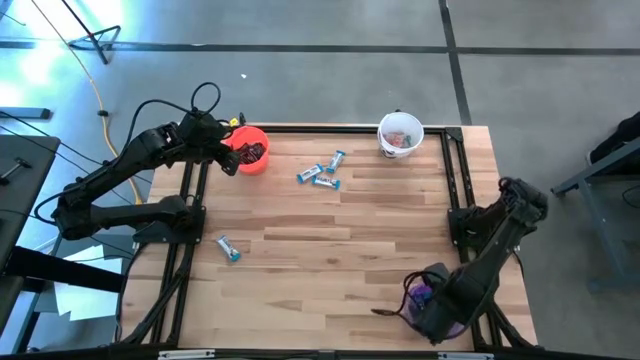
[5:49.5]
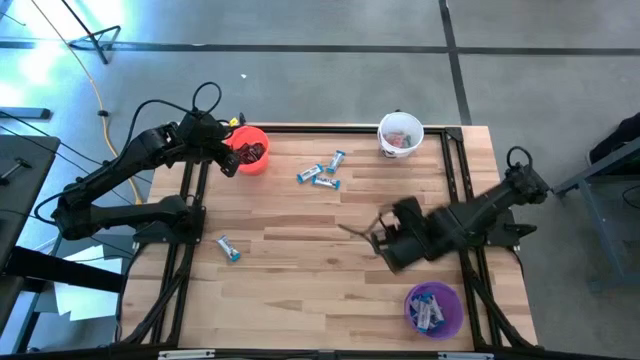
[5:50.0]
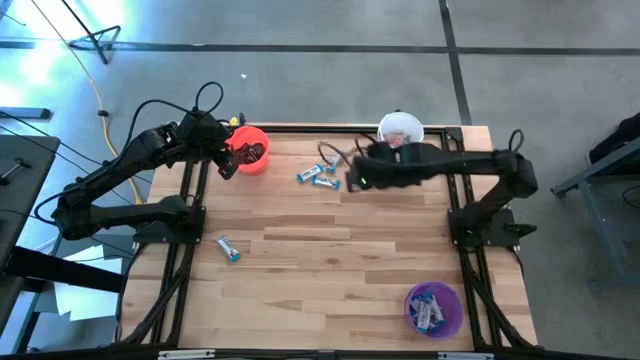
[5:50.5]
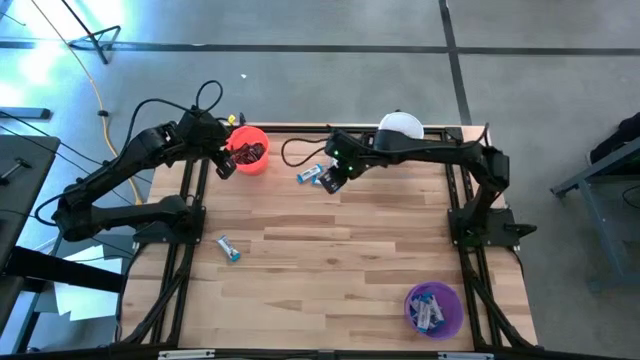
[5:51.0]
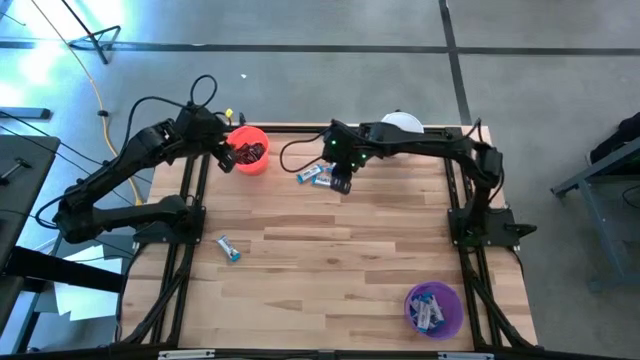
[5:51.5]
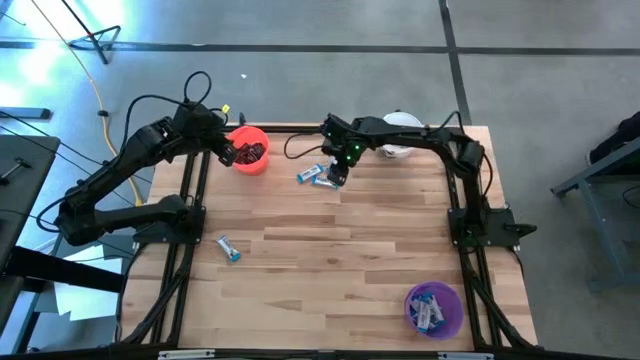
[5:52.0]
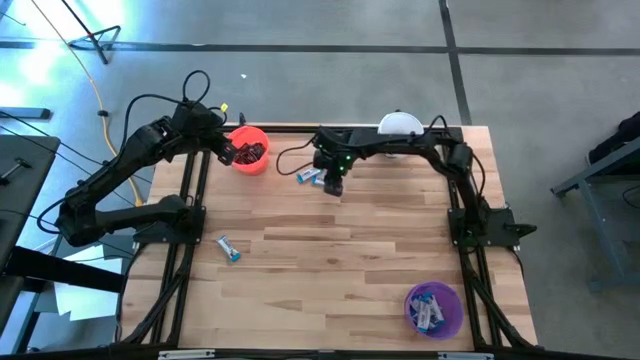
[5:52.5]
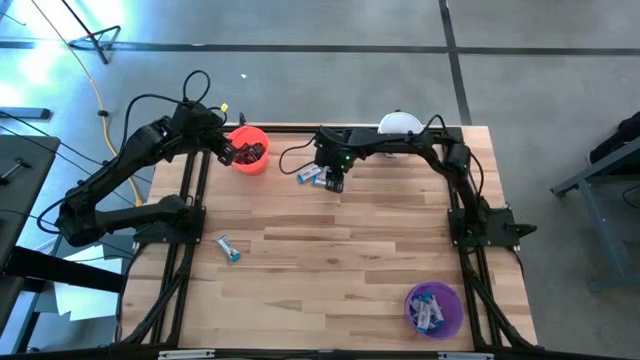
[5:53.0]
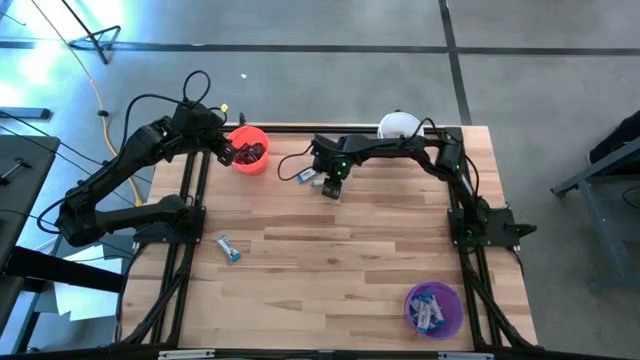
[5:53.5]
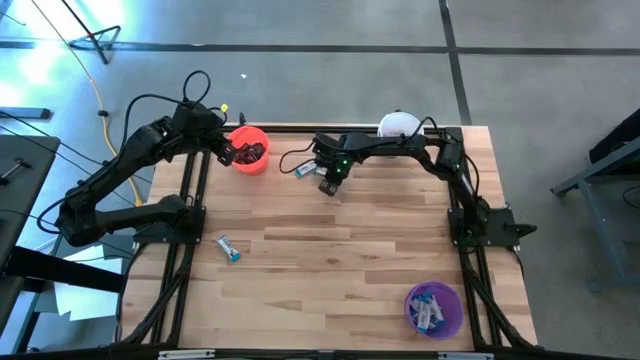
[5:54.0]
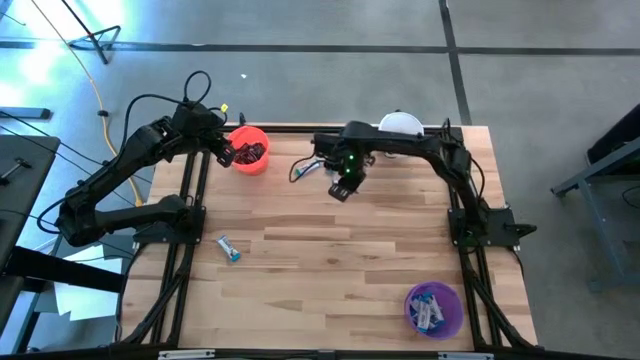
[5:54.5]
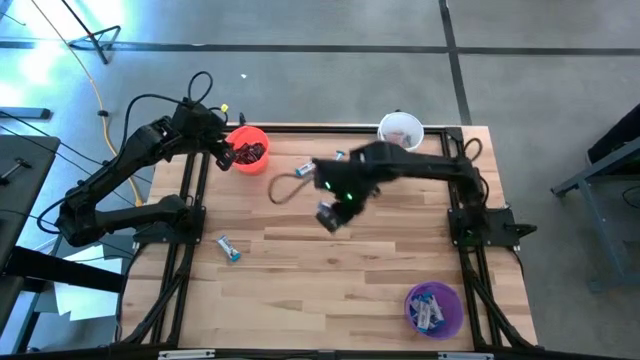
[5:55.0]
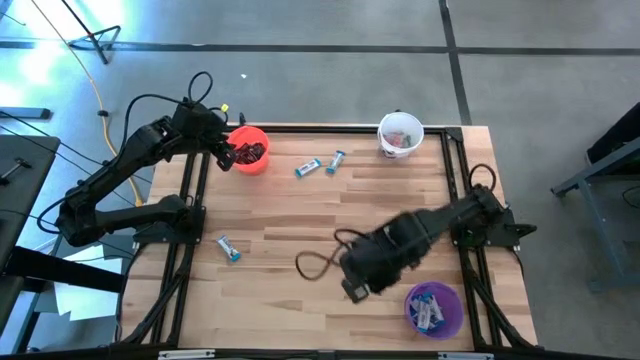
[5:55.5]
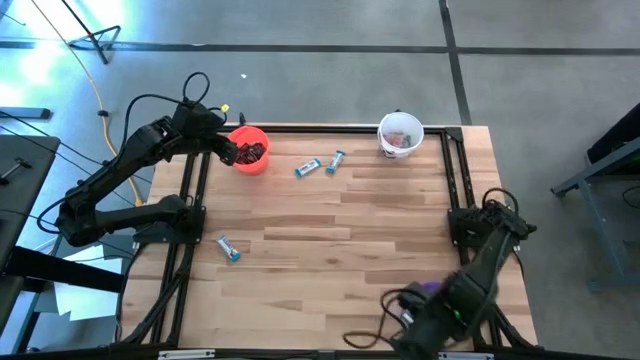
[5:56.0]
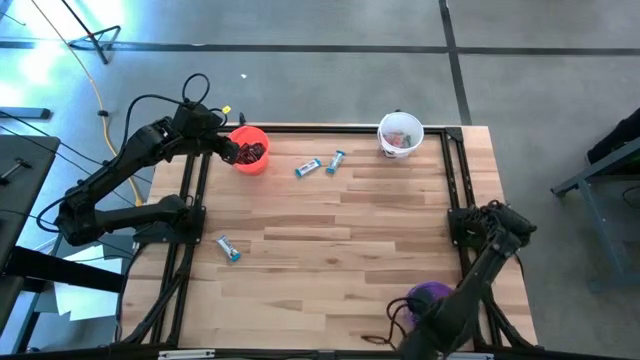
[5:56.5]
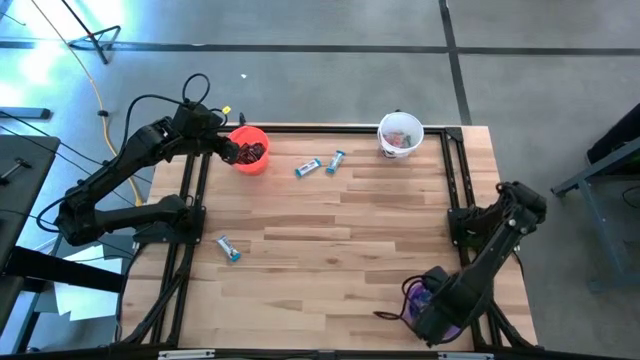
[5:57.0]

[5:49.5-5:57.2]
Task: Sort candy
Put the white chocolate into the violet bucket

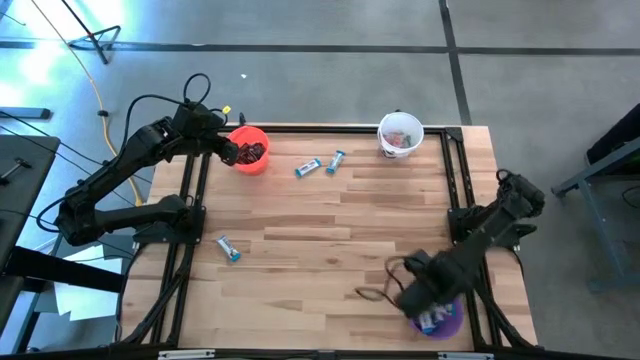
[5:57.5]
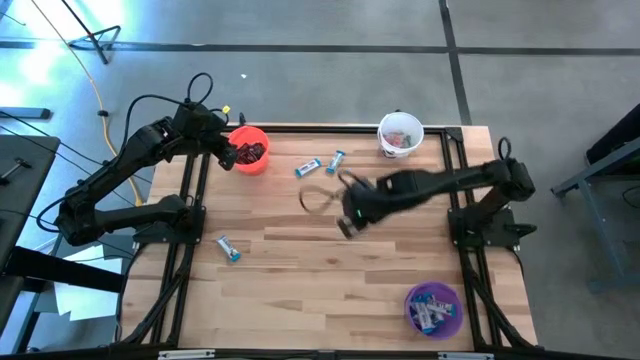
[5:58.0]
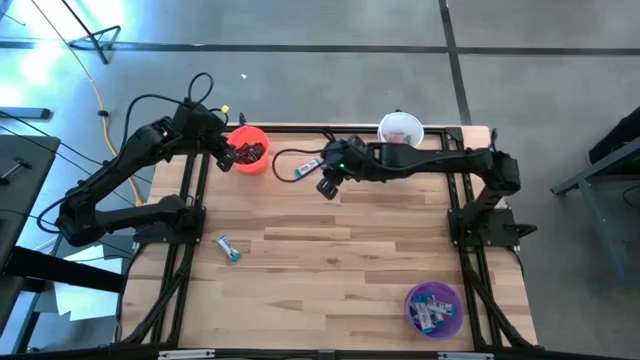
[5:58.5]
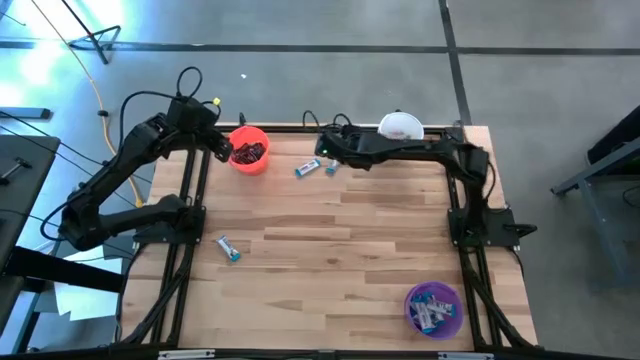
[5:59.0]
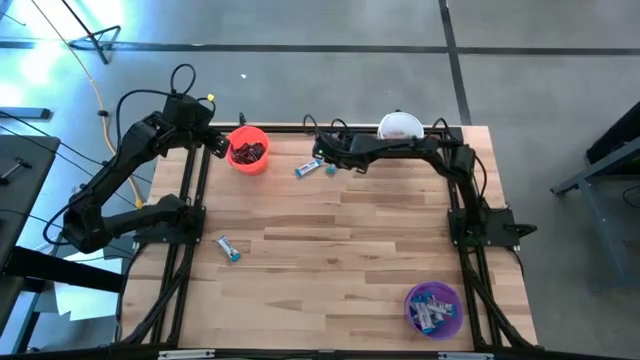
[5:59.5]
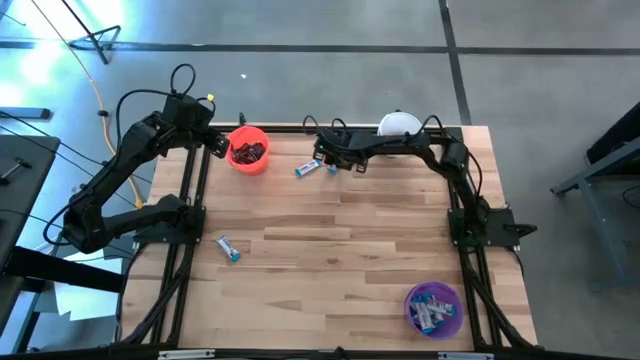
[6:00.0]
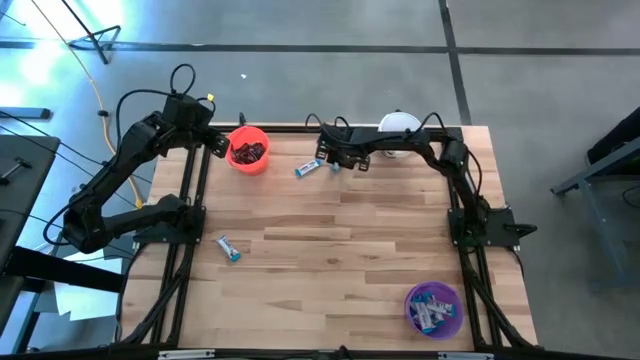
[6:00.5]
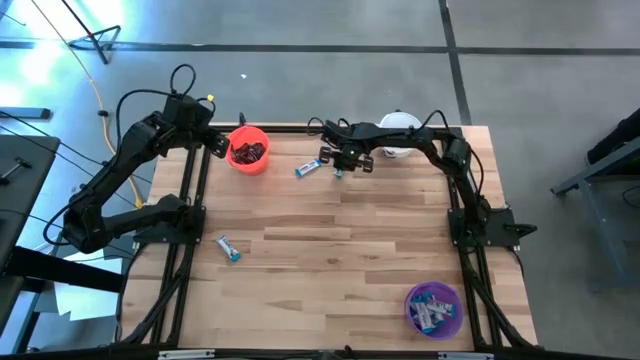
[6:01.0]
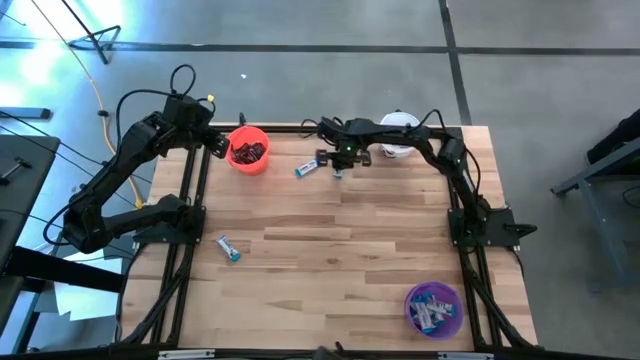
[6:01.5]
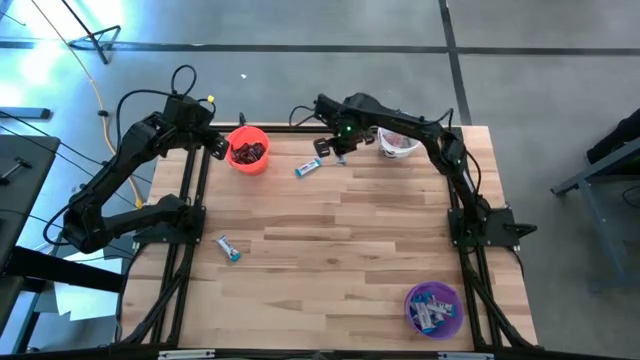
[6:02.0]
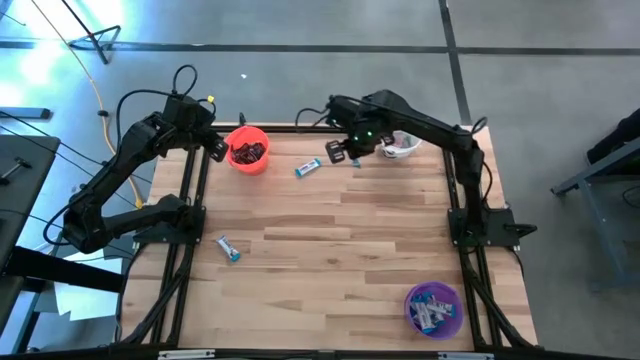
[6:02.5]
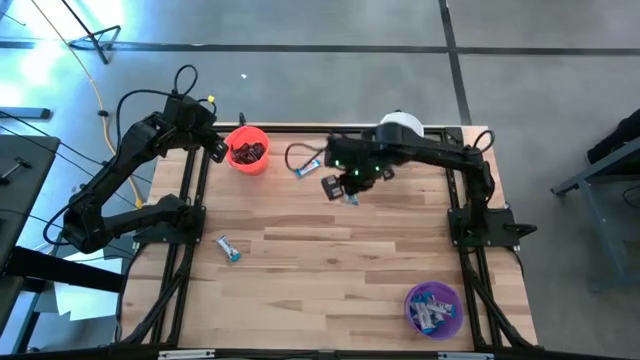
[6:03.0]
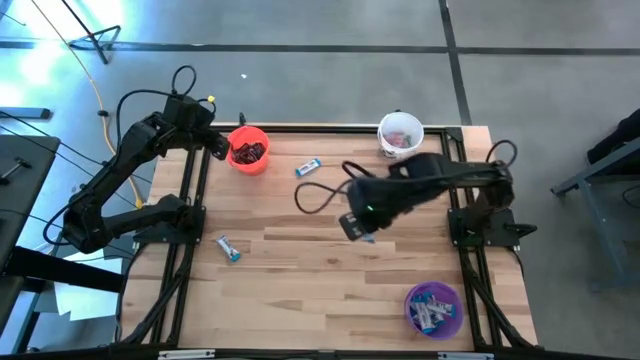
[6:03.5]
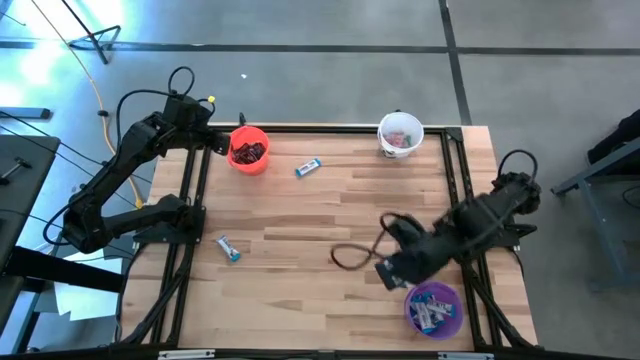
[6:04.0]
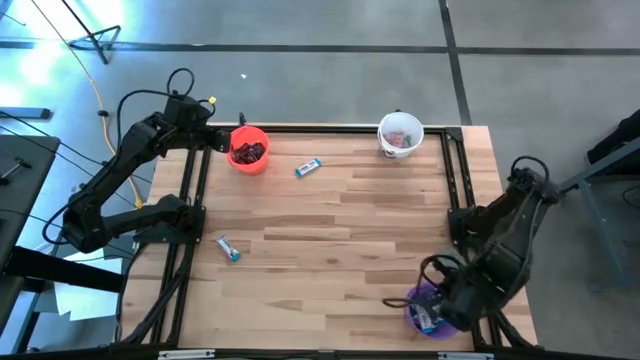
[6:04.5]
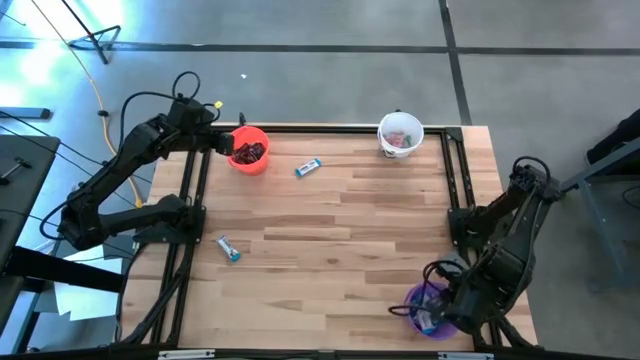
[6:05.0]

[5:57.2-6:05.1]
Put the white chocolate into the violet bucket

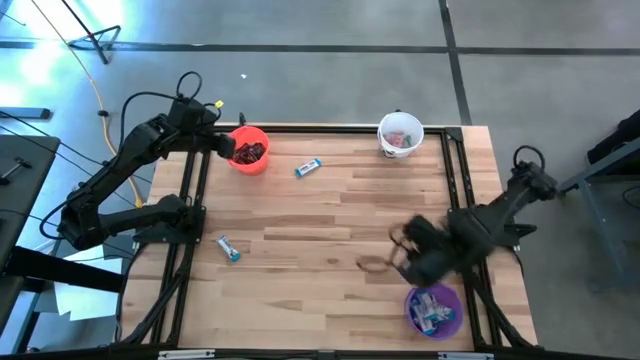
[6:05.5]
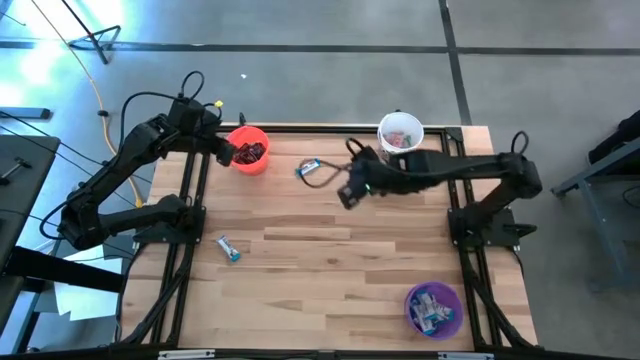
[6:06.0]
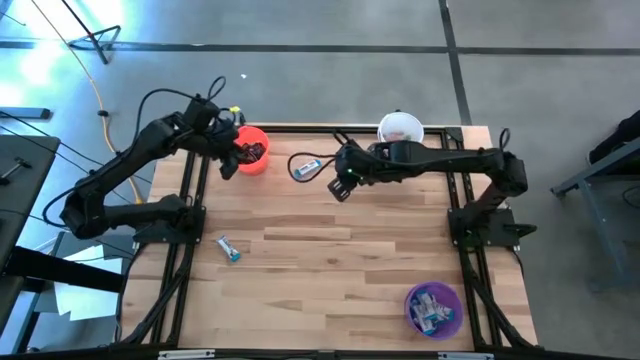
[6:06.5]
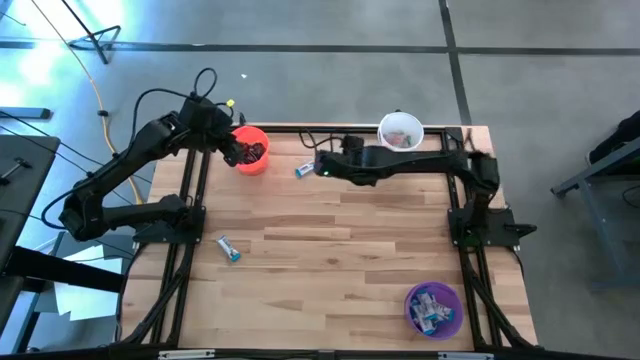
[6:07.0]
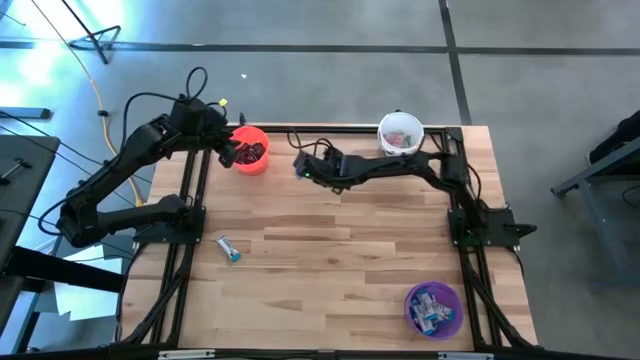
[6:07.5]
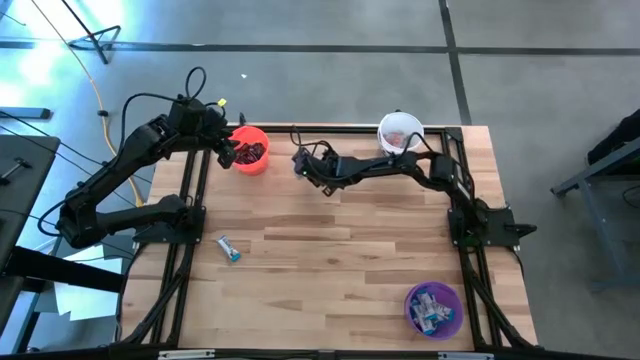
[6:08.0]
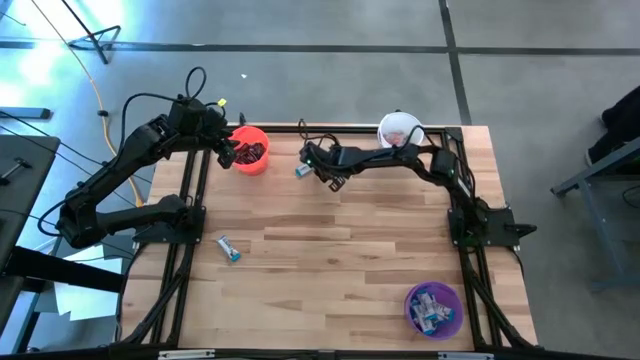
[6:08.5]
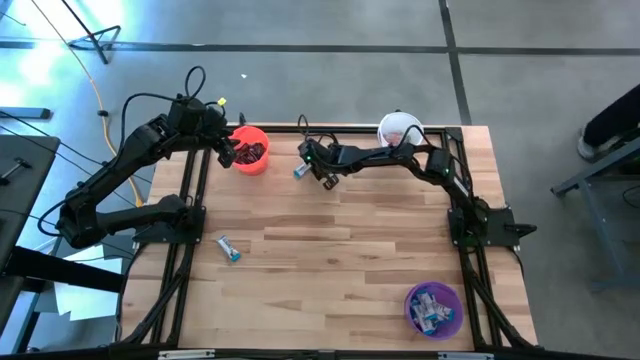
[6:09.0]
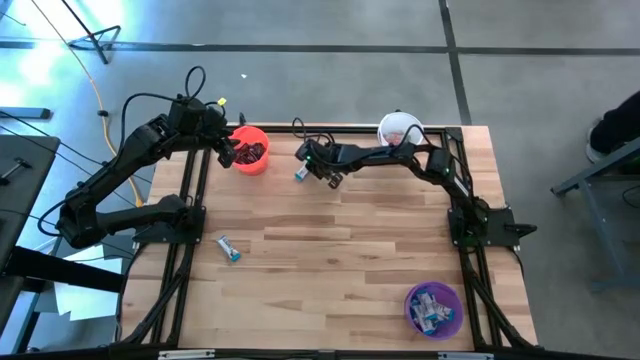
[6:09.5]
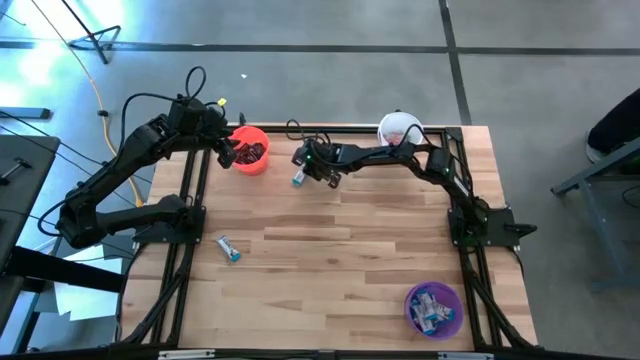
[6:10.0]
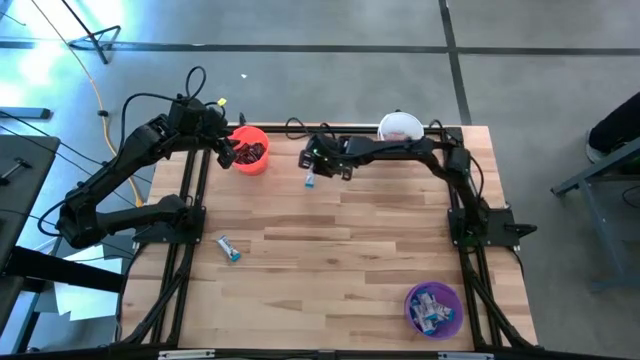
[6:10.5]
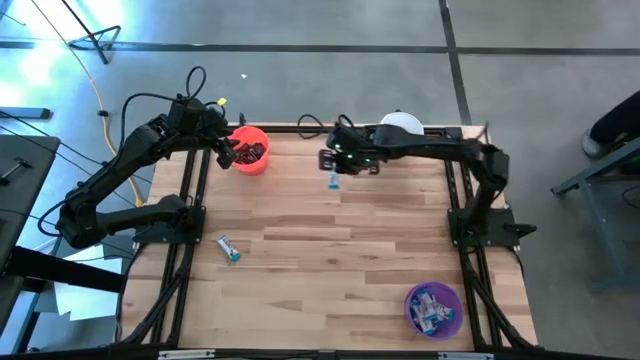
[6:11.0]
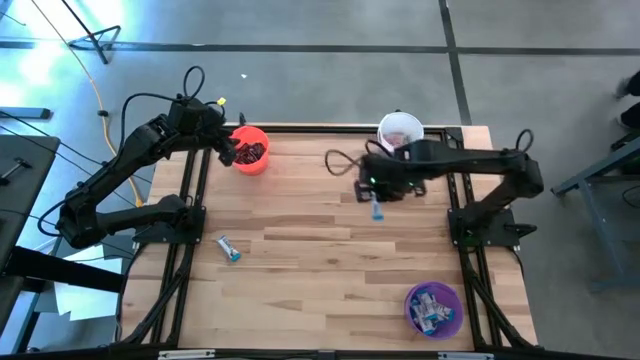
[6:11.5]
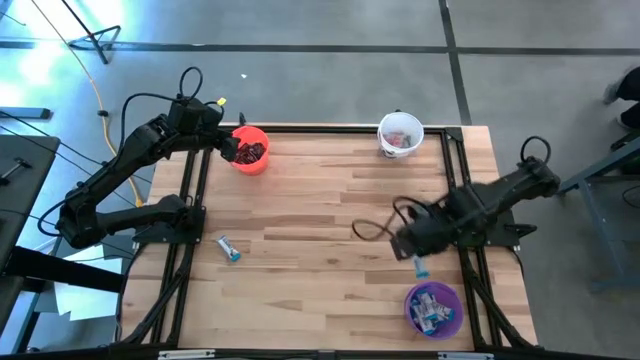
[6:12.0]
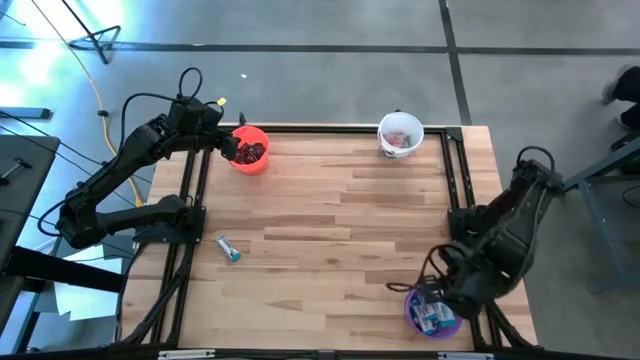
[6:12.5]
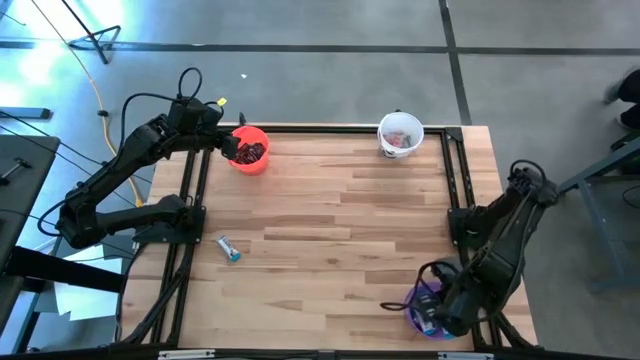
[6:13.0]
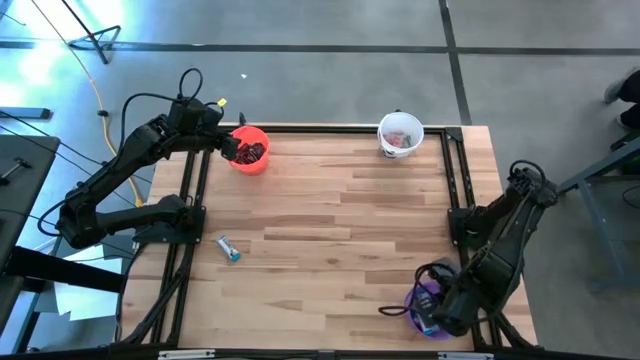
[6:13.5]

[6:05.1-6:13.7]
Put the white chocolate into the violet bucket
